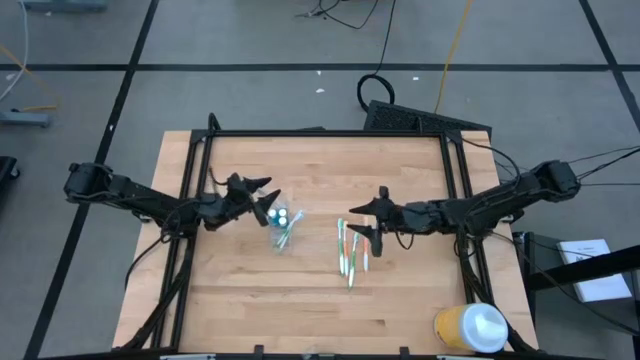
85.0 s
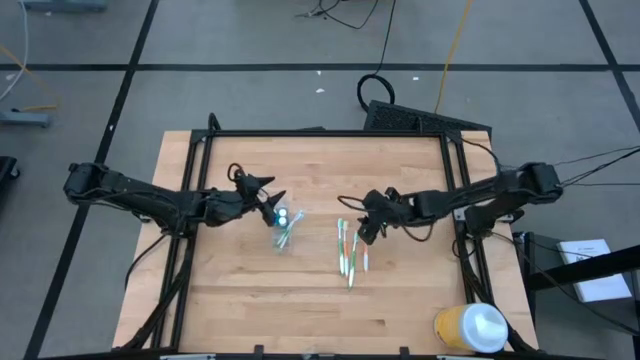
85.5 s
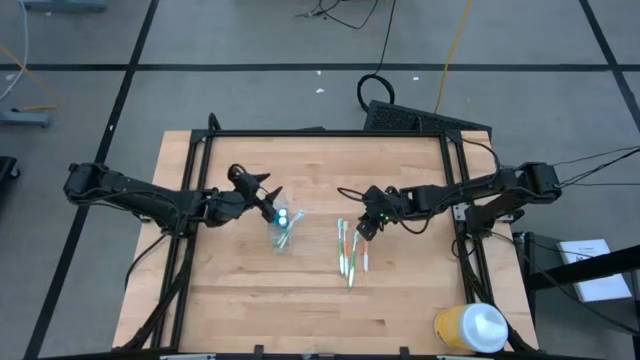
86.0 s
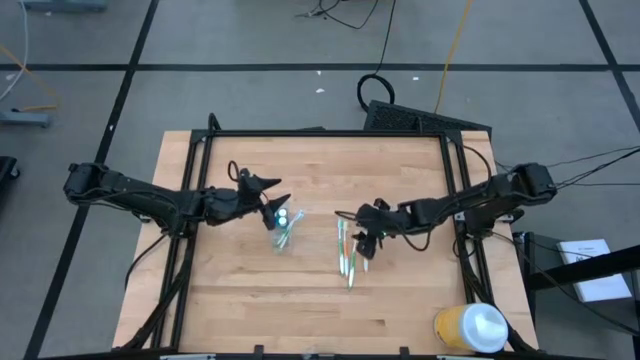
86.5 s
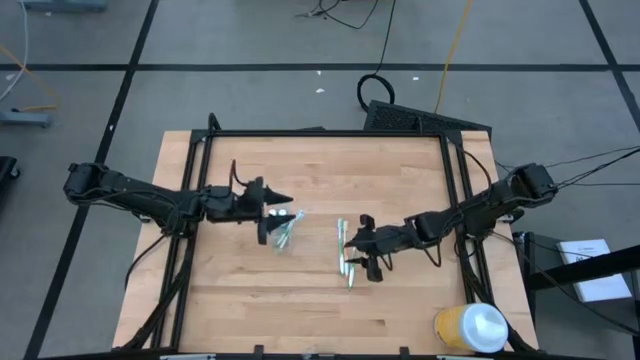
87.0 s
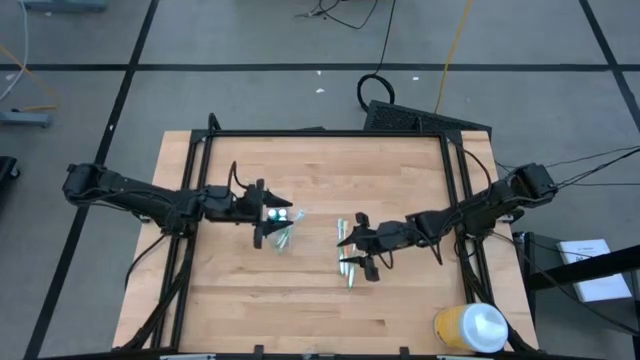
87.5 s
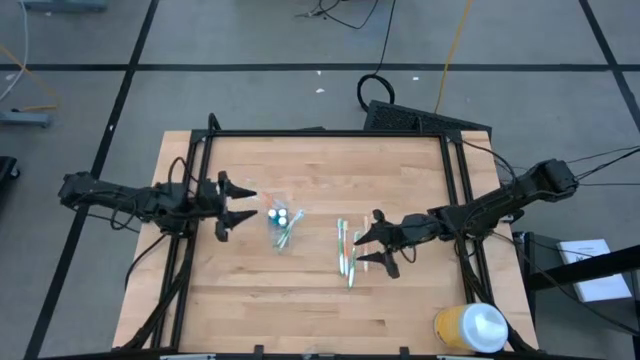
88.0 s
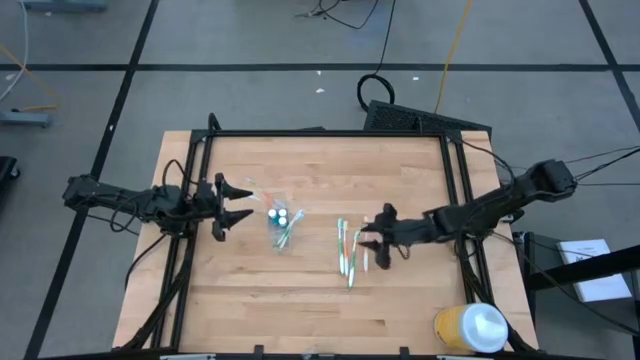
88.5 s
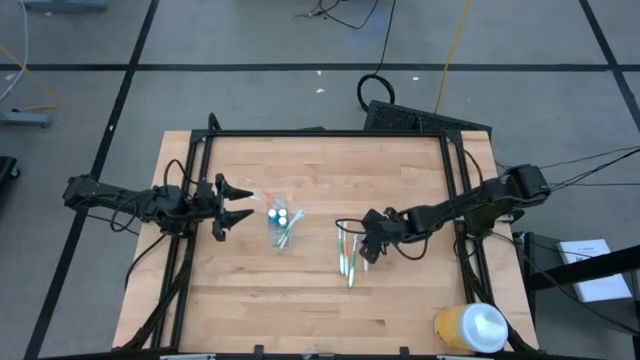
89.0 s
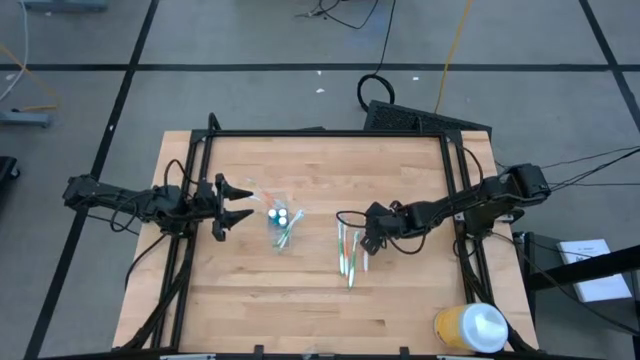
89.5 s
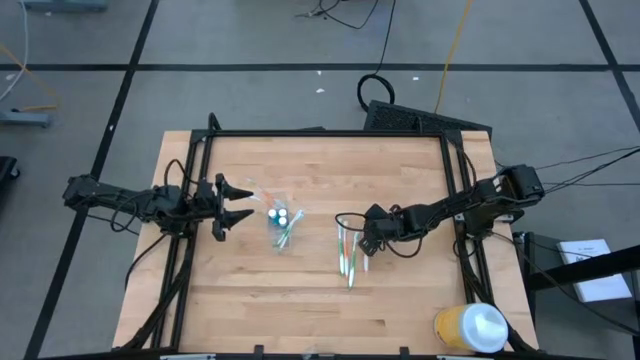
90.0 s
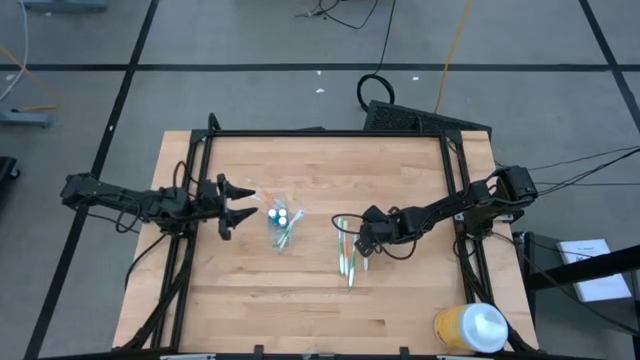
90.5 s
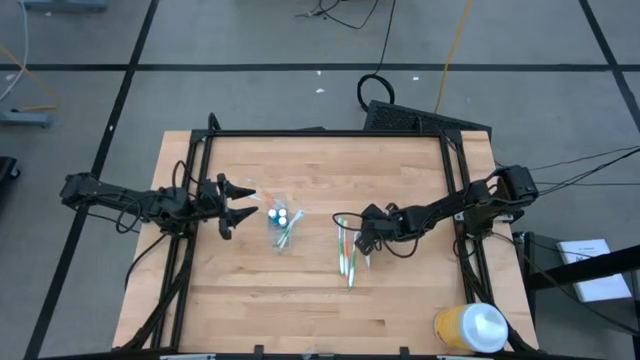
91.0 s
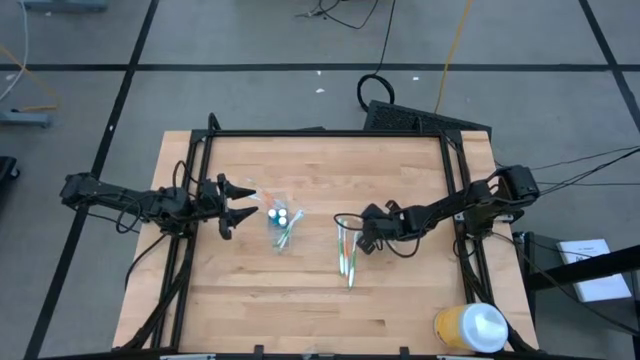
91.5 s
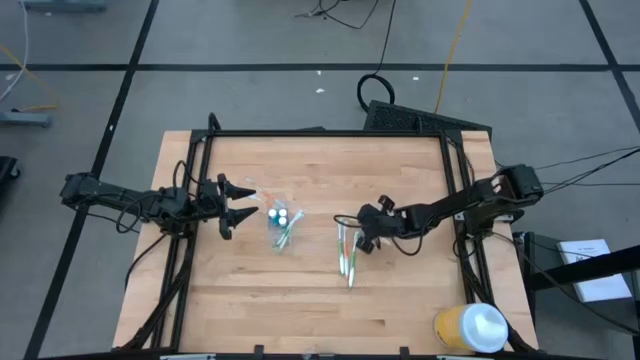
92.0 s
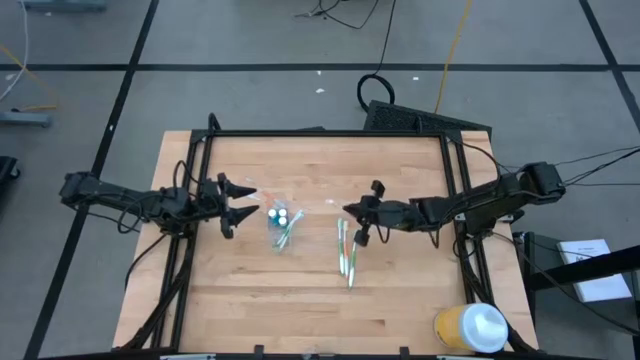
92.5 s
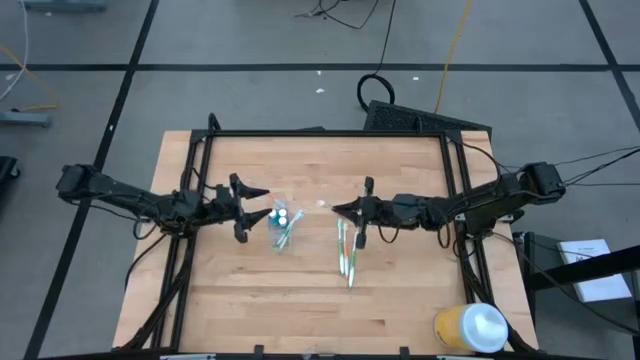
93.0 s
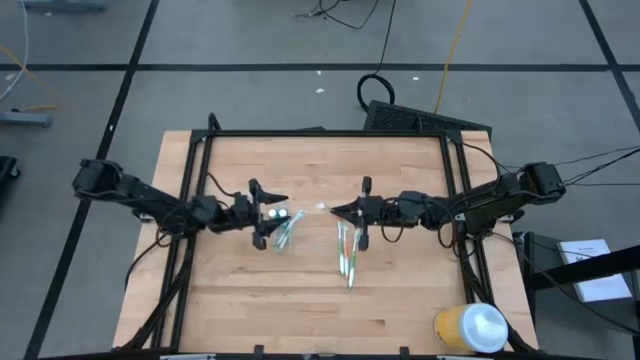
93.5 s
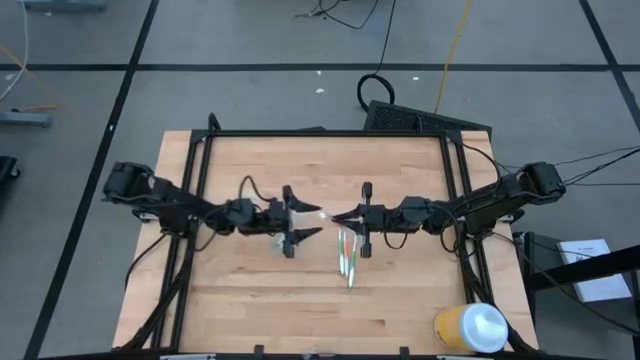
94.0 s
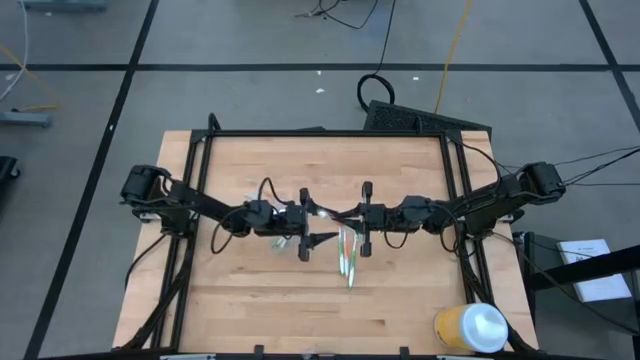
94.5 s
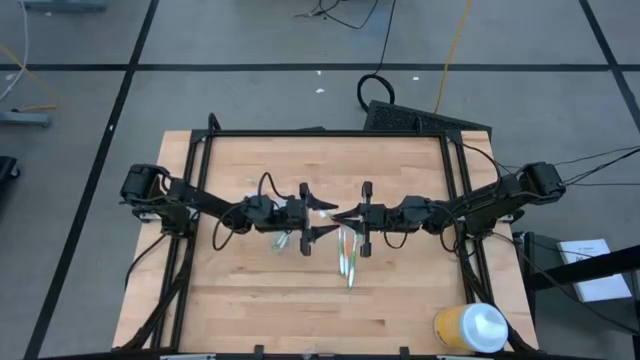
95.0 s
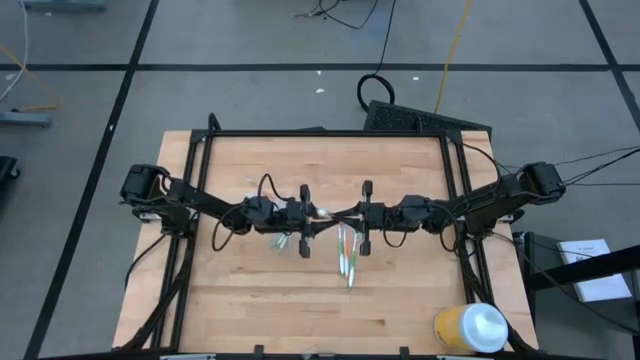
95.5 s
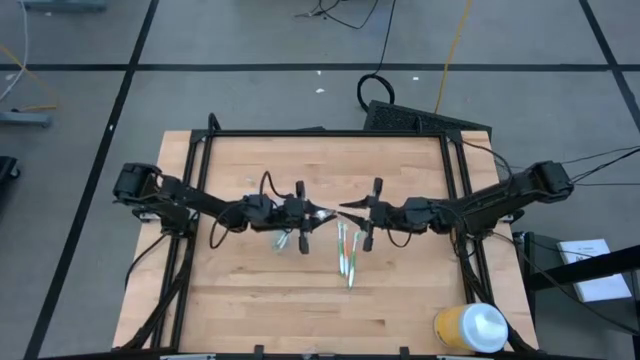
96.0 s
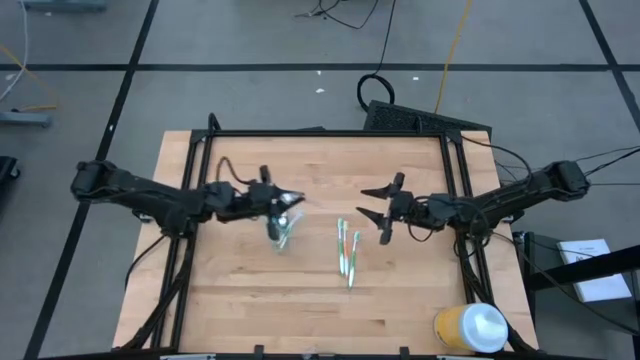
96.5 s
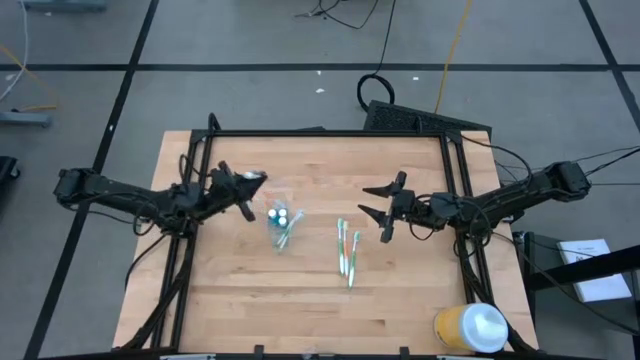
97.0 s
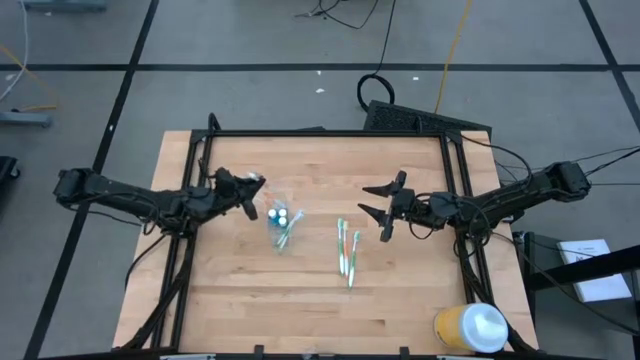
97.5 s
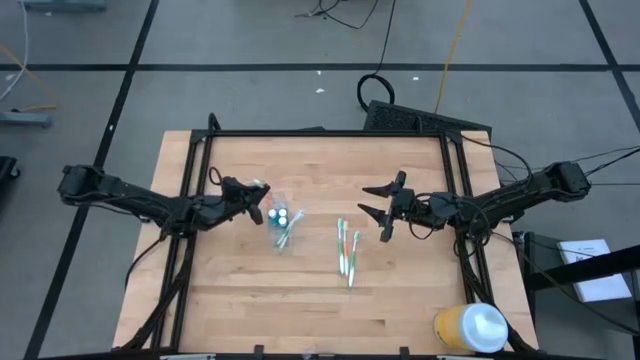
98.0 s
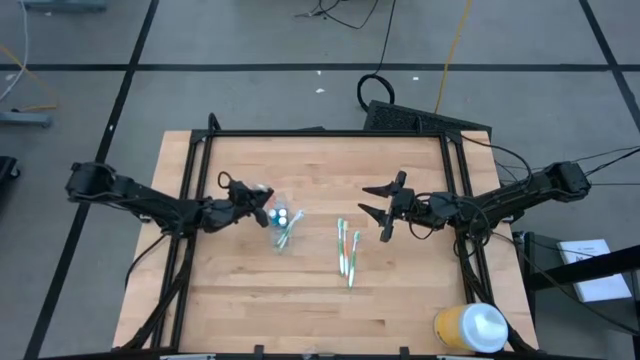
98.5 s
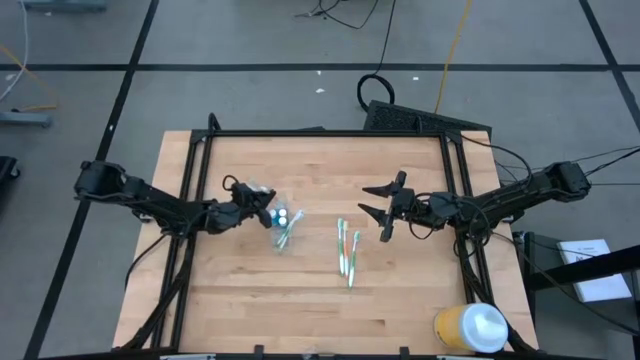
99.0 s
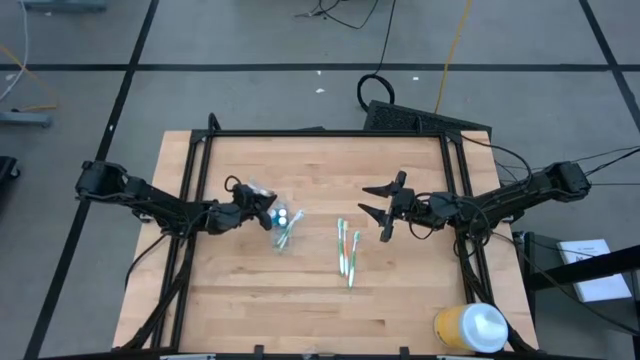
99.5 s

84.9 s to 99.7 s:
Task: Pick & Place toothbrushing station
Put the orange toothbrush in the transparent organizer

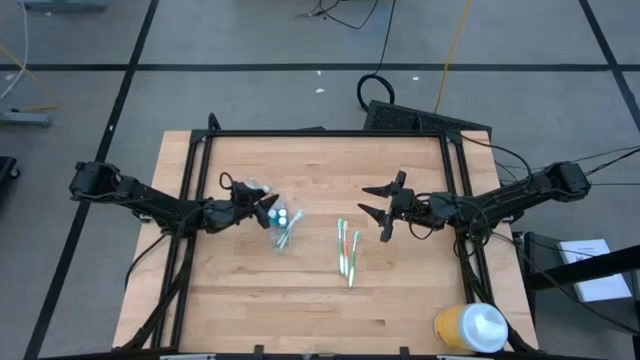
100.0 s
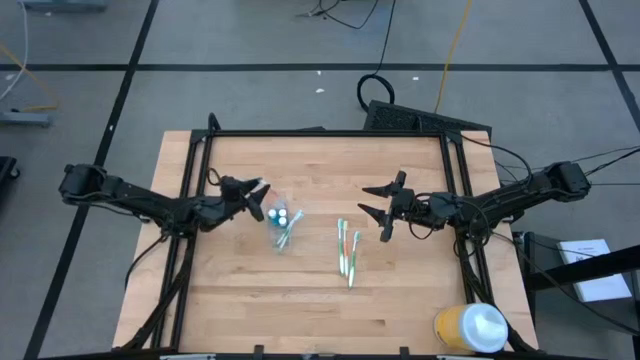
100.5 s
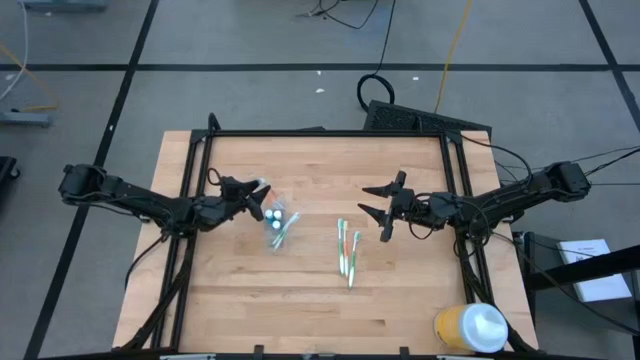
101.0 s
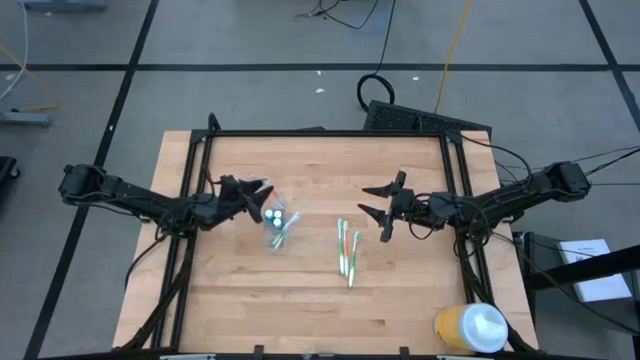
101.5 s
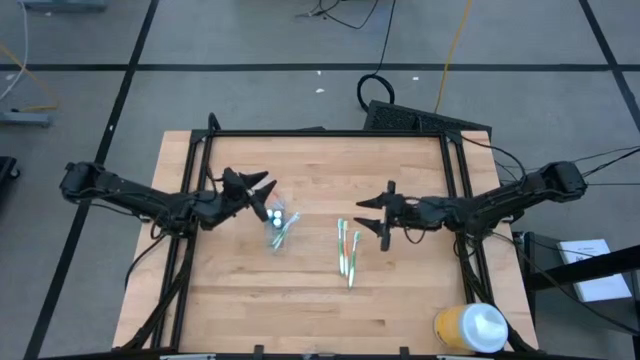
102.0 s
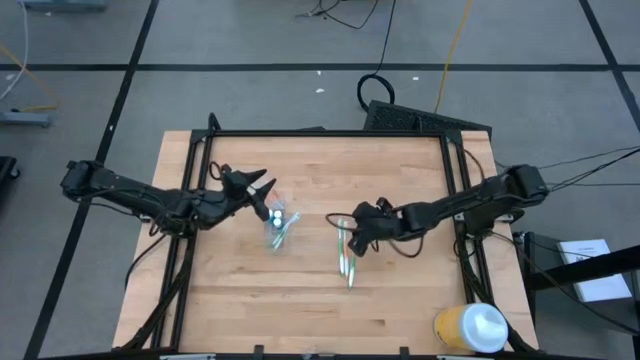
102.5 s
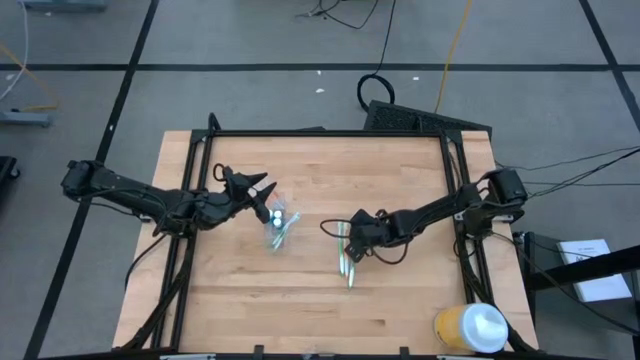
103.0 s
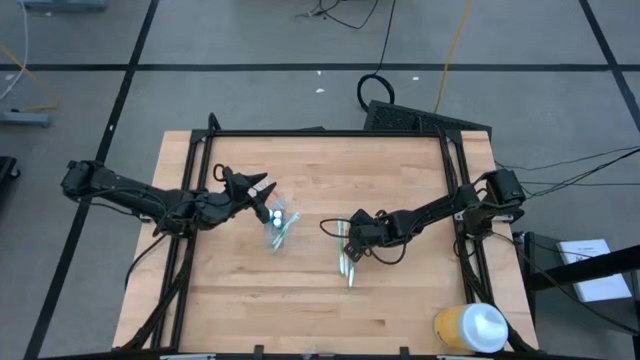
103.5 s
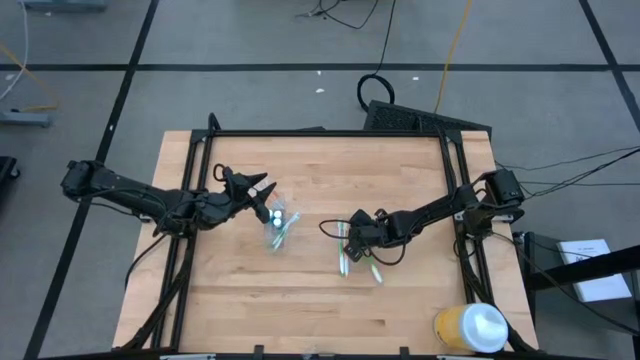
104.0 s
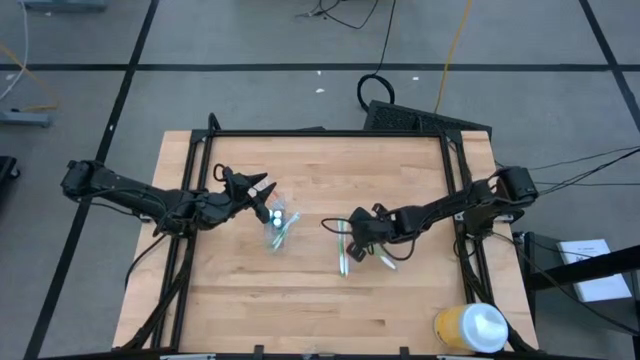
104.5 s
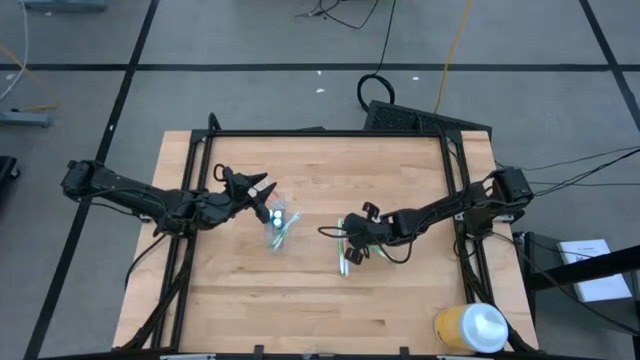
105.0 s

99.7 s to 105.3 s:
Put the green toothbrush in the transparent organizer

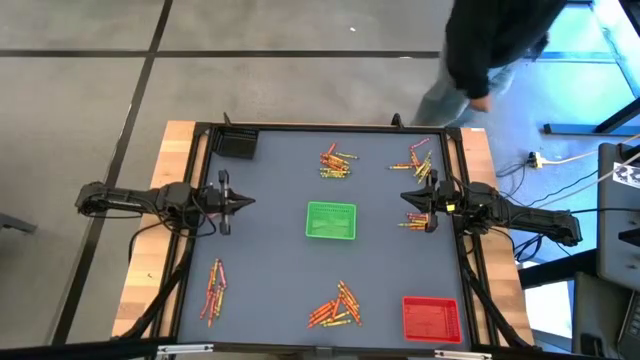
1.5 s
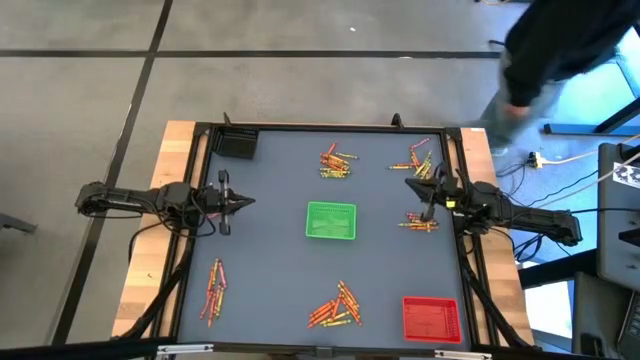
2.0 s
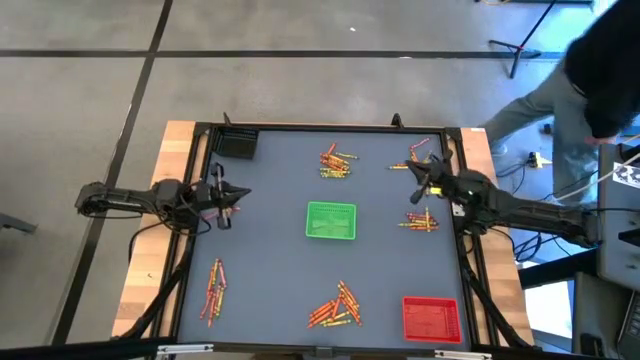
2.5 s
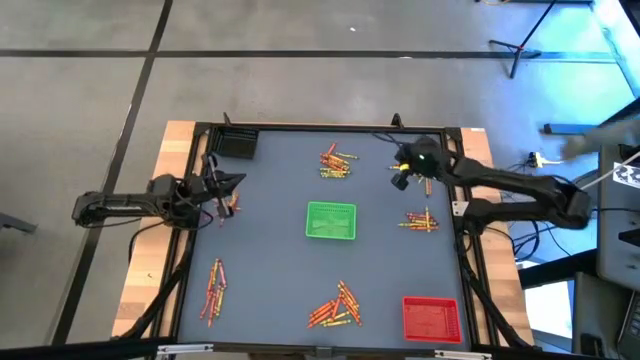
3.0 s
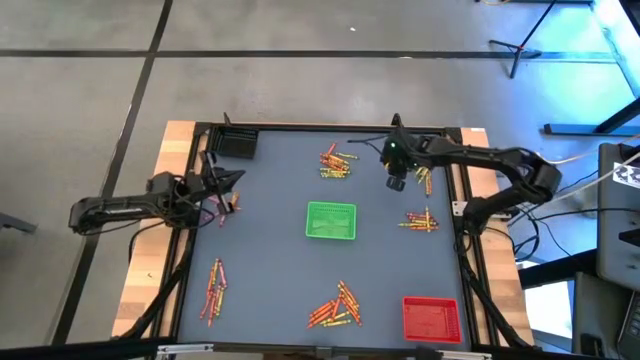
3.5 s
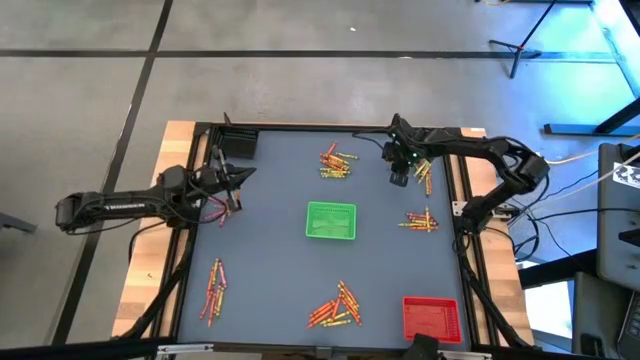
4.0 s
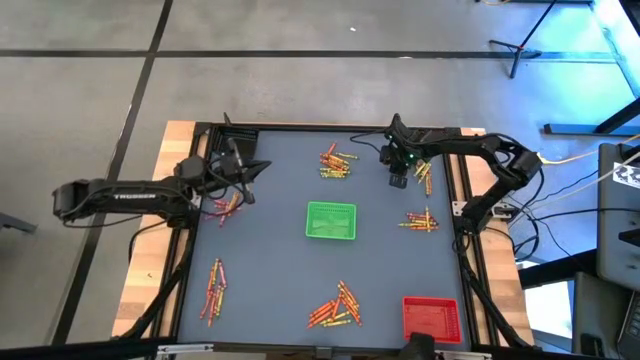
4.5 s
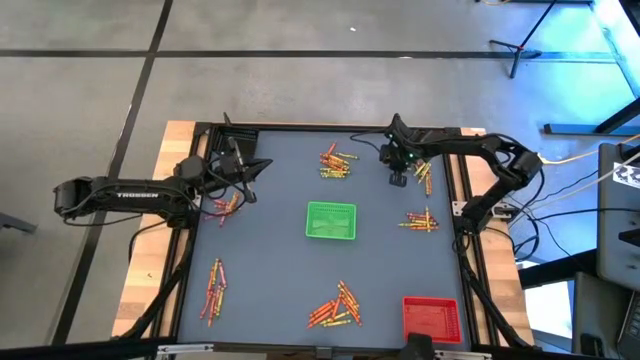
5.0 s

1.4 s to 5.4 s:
Task: Sort crayons
Put the green crayon into the black bin
